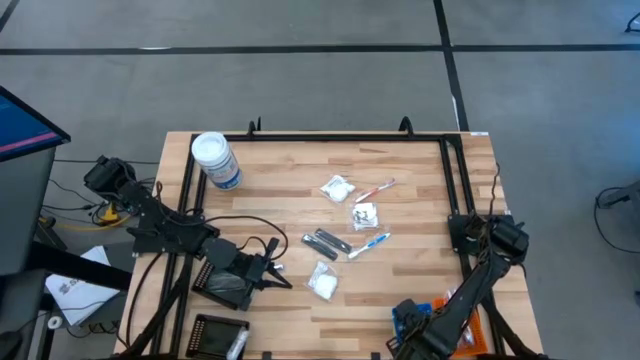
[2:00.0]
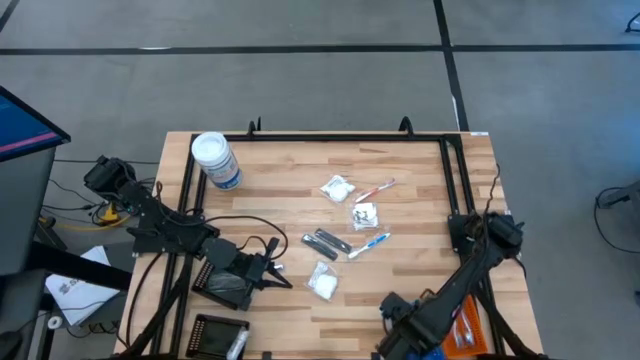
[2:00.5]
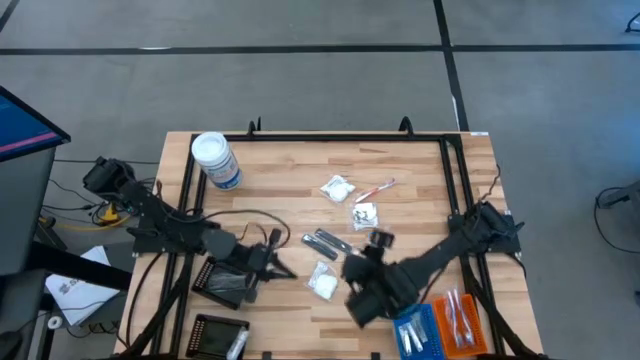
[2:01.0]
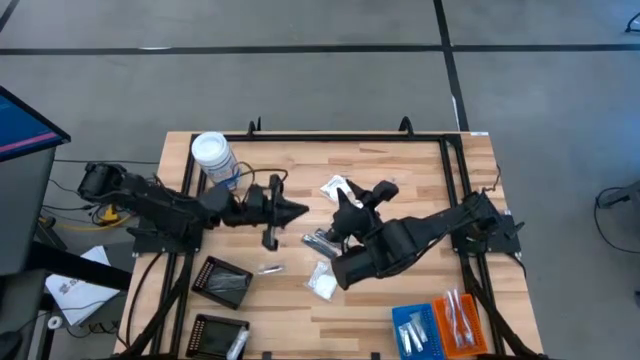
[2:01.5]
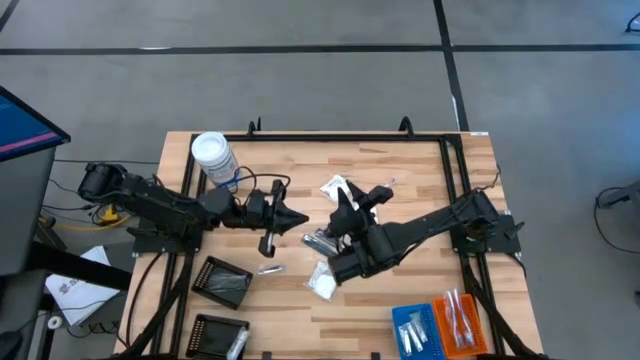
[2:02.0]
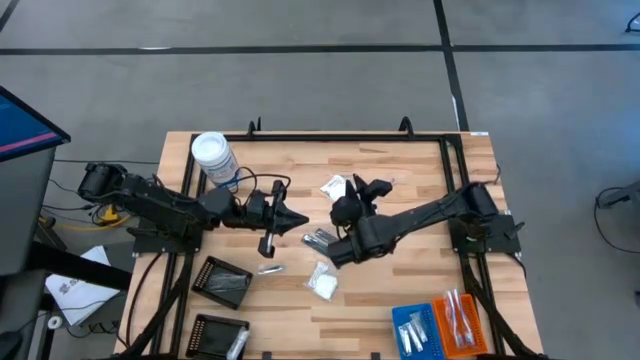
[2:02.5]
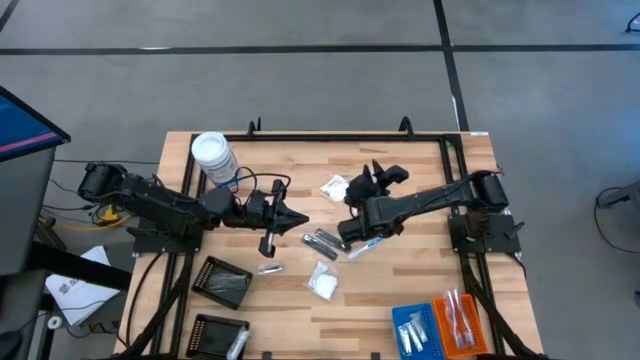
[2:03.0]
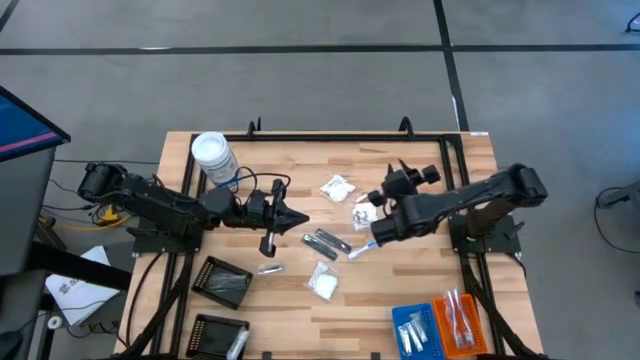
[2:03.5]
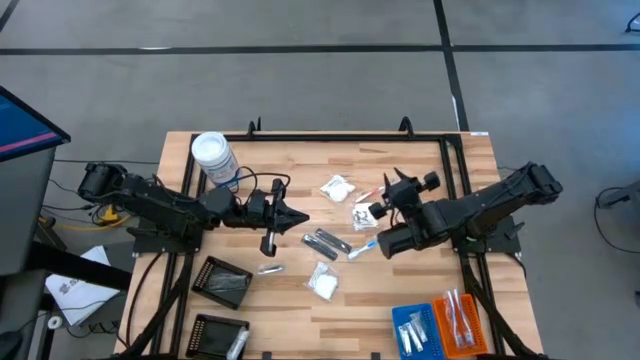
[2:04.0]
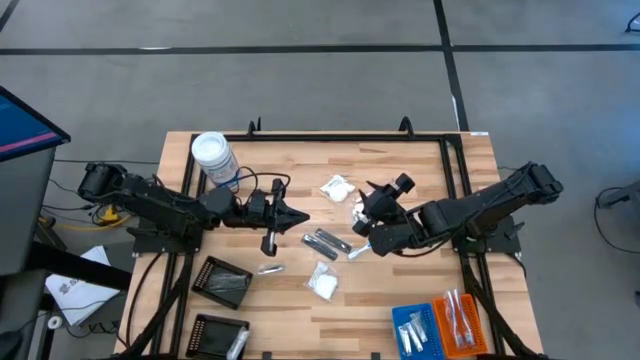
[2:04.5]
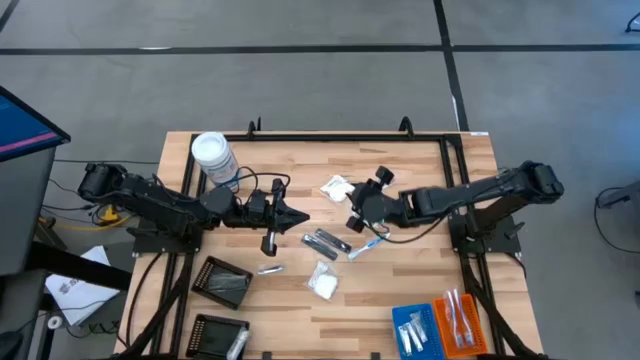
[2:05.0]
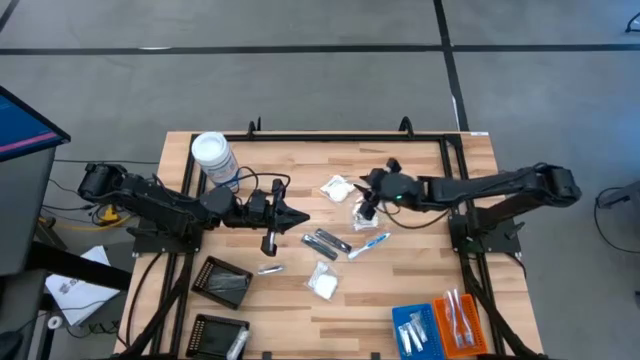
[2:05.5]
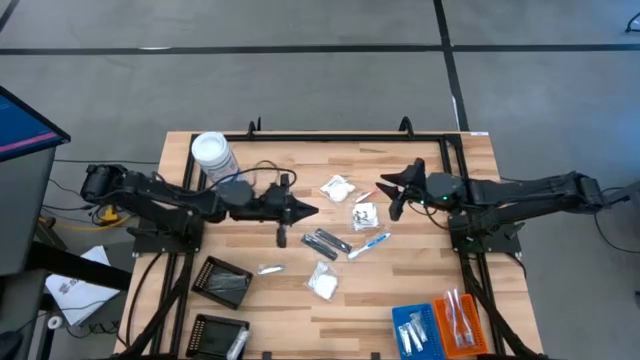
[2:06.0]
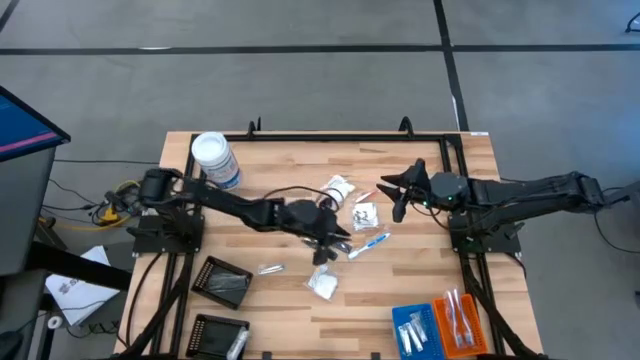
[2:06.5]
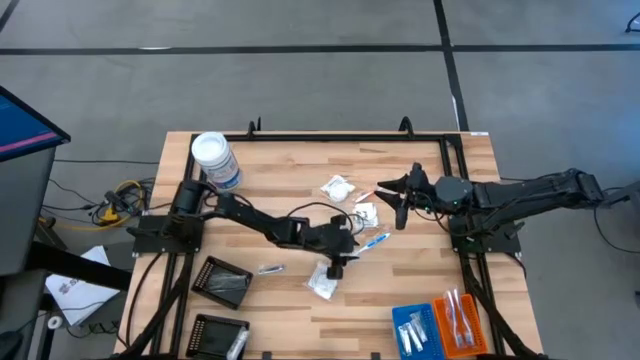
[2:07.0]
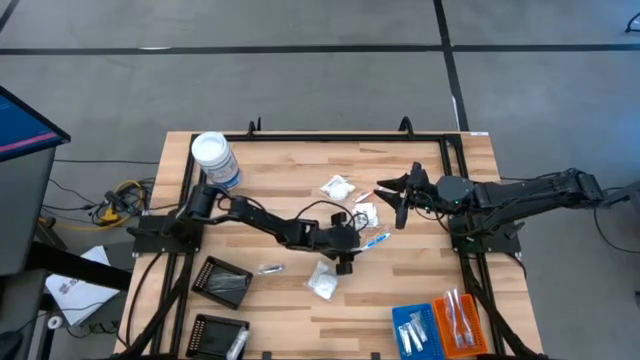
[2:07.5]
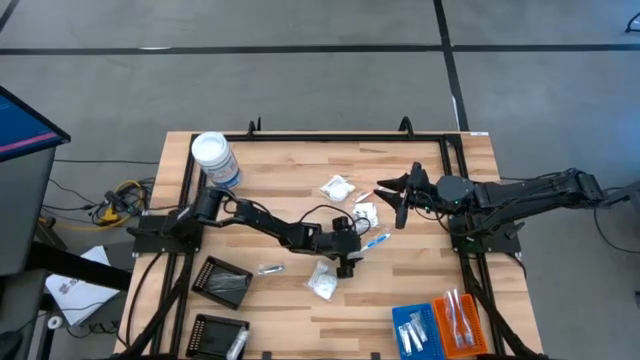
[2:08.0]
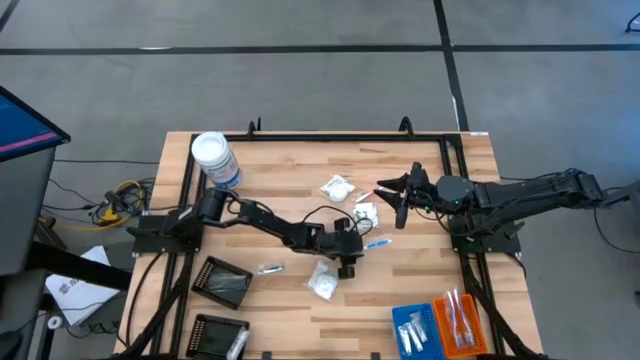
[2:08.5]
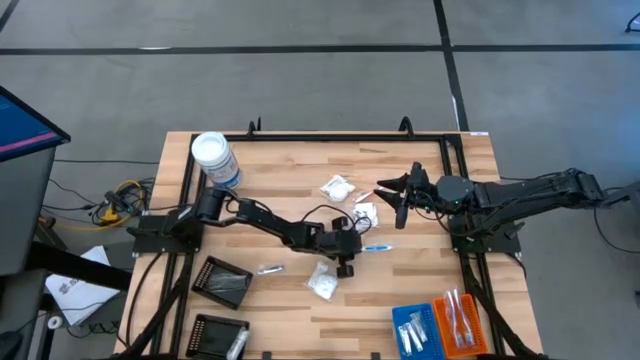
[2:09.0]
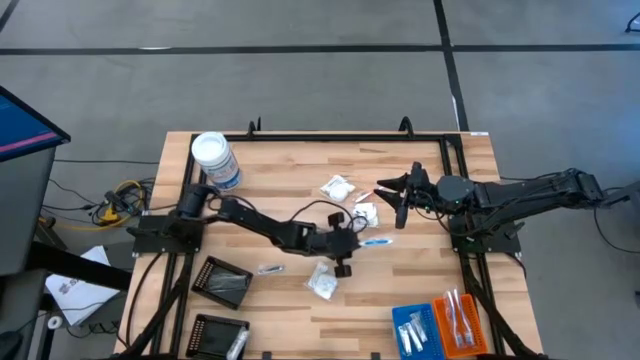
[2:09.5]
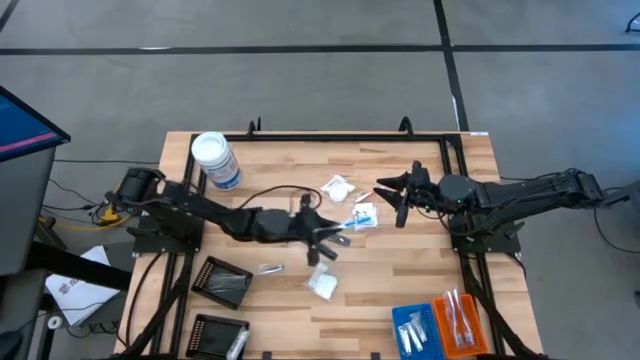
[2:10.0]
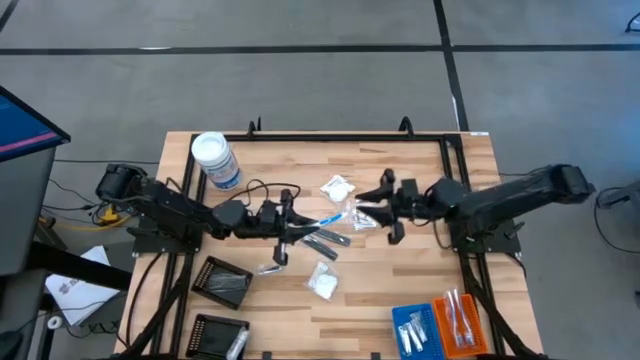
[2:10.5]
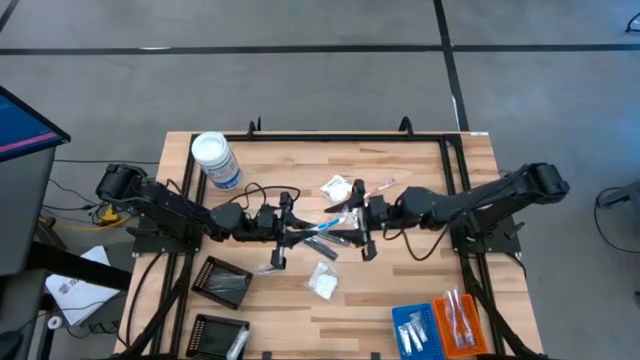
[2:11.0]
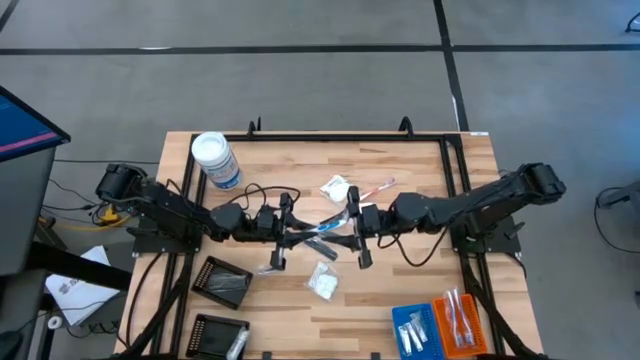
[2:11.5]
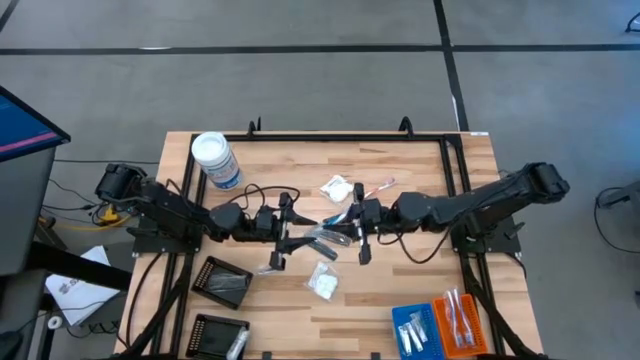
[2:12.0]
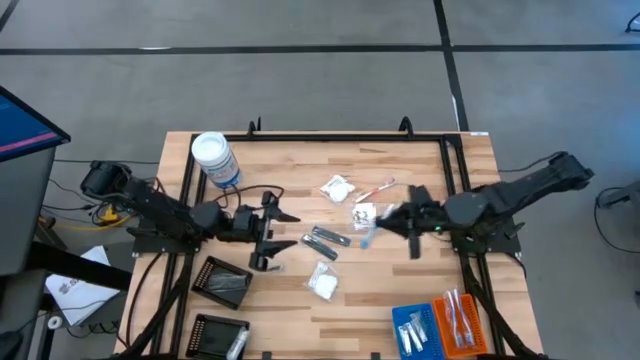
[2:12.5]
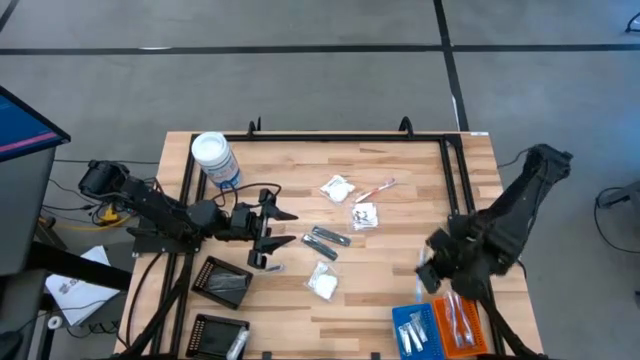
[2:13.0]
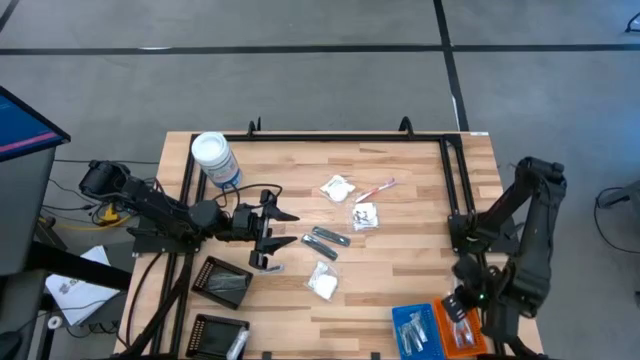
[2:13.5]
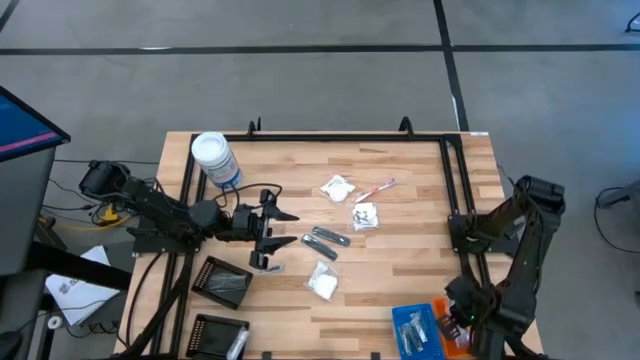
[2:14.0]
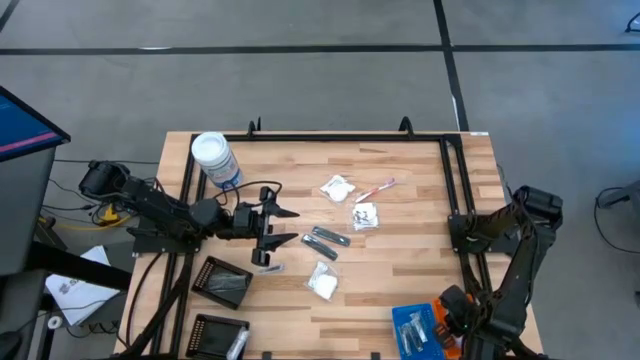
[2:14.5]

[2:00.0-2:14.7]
Task: Pick & Place Travel size toiletries
Put the light blue toothbrush into the orange bin

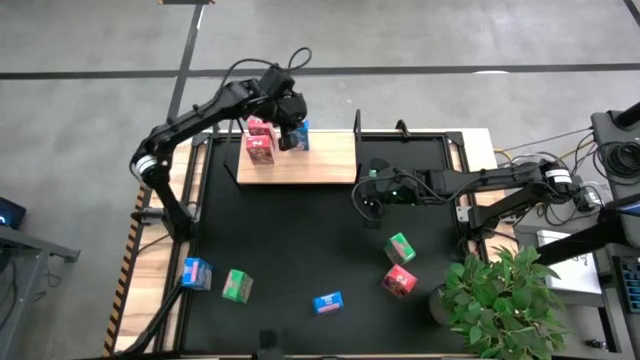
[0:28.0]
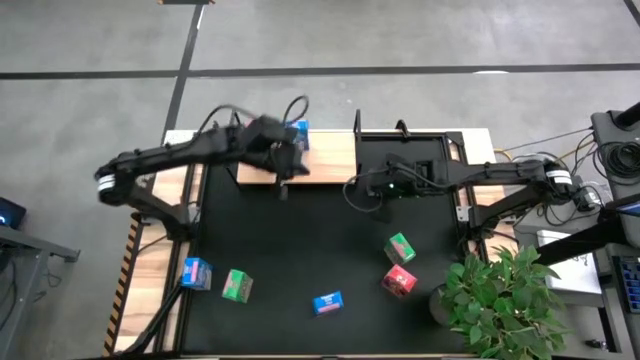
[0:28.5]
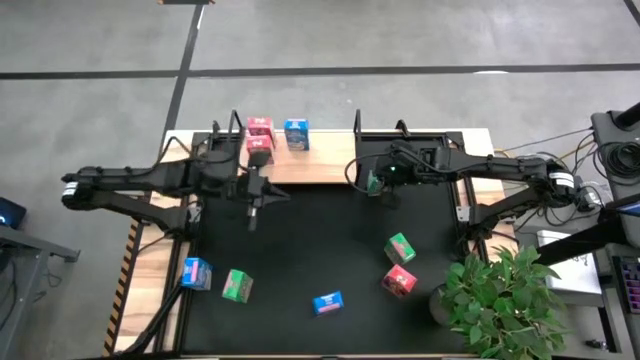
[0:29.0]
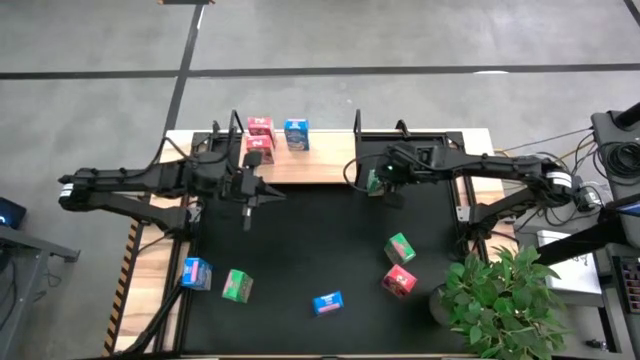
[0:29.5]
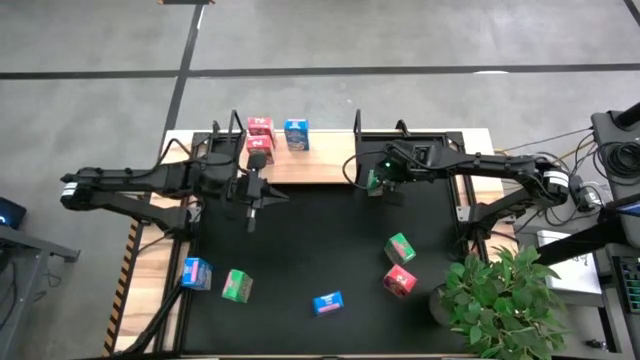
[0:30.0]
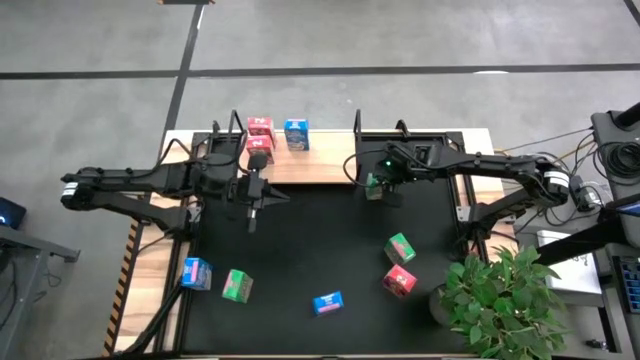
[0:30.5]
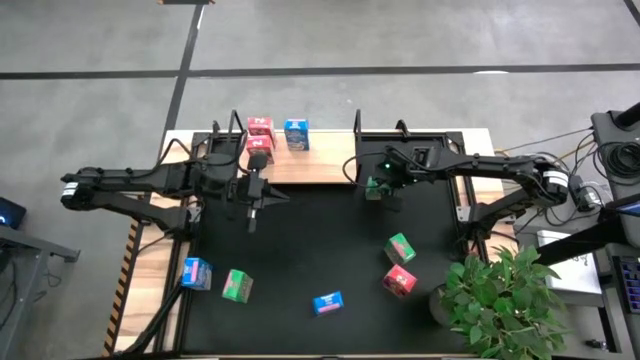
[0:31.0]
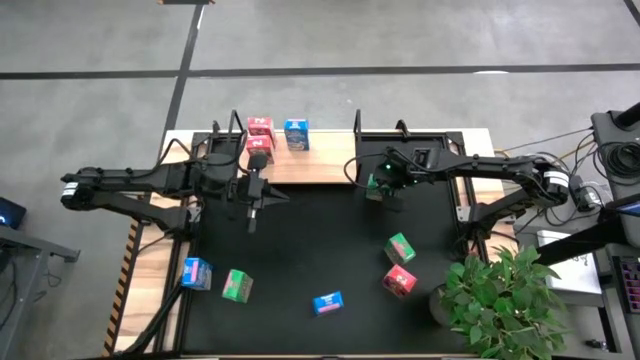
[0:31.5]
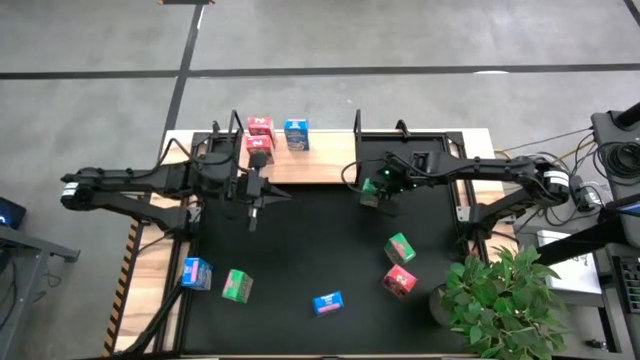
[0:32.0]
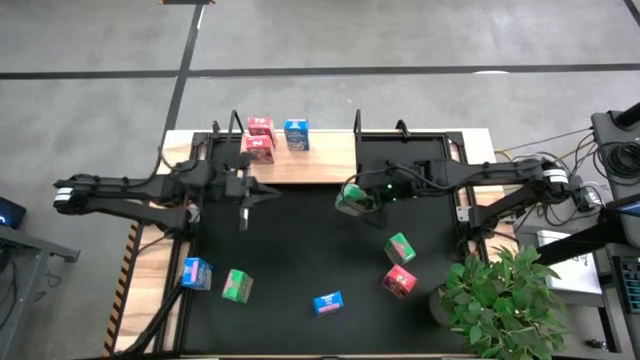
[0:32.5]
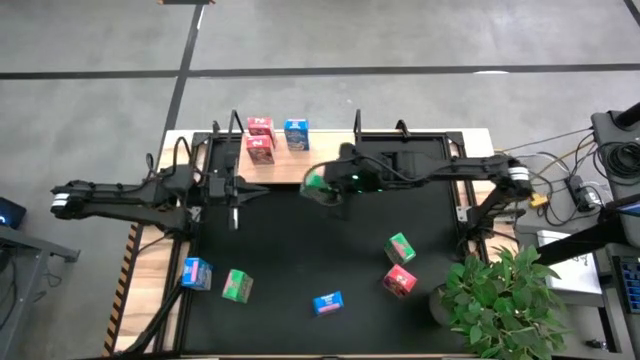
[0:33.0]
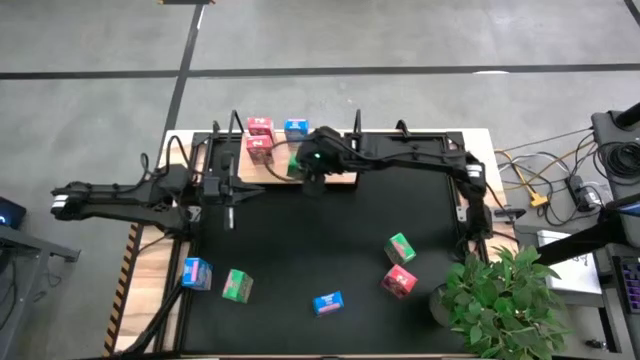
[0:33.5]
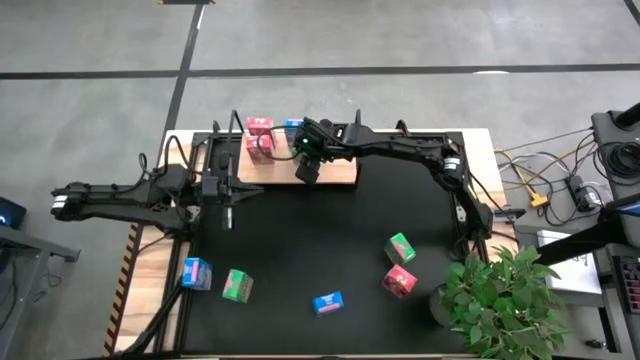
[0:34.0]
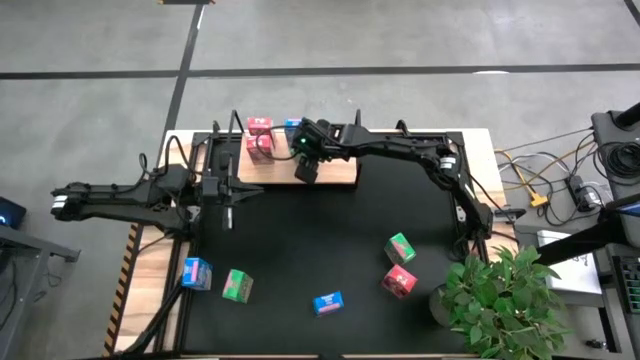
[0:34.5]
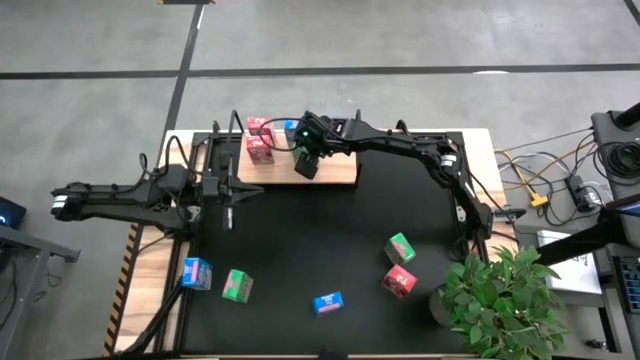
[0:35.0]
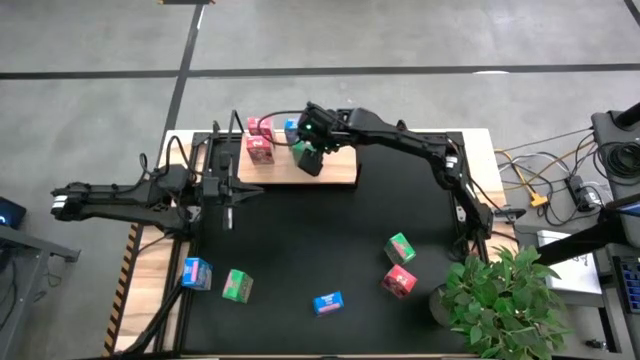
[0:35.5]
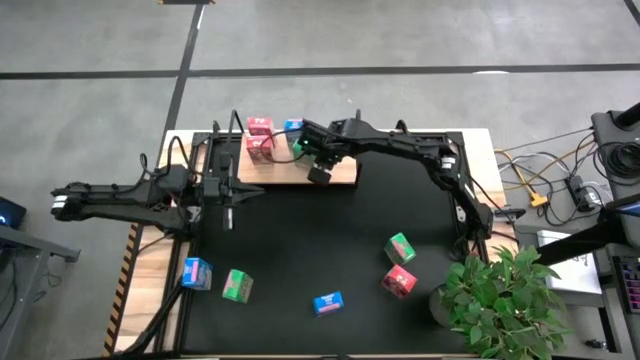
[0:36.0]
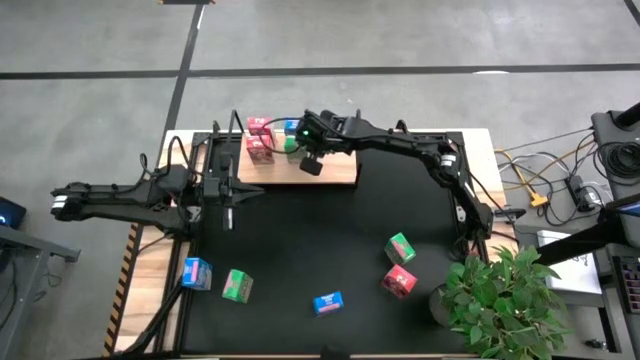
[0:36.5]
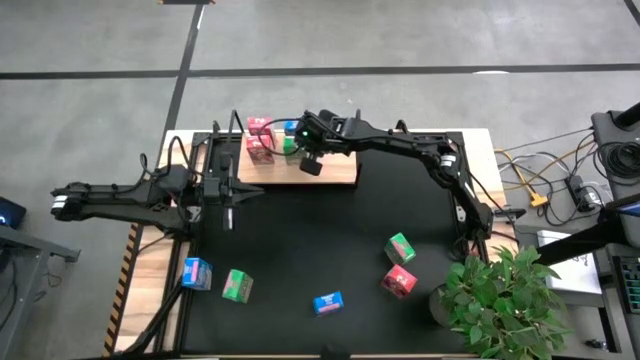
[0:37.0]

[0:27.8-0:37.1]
Task: Stack cereal on shelf
Put the top green cereal box on the shelf
